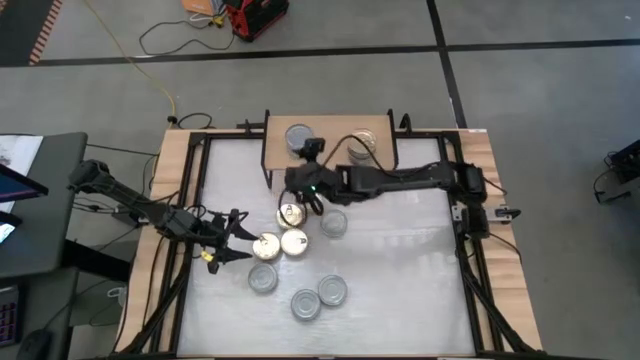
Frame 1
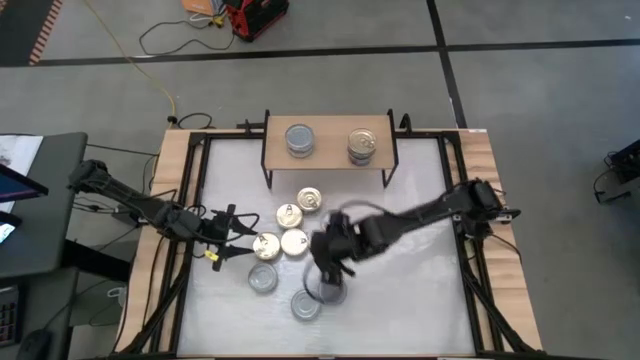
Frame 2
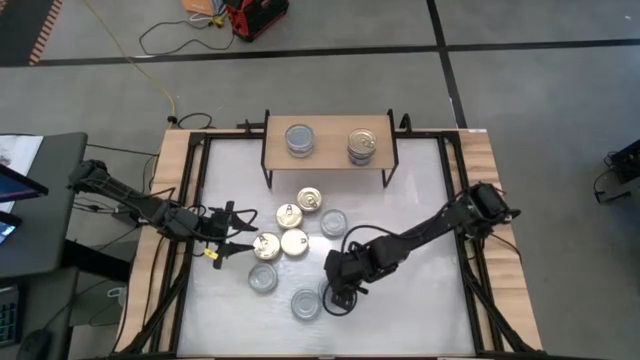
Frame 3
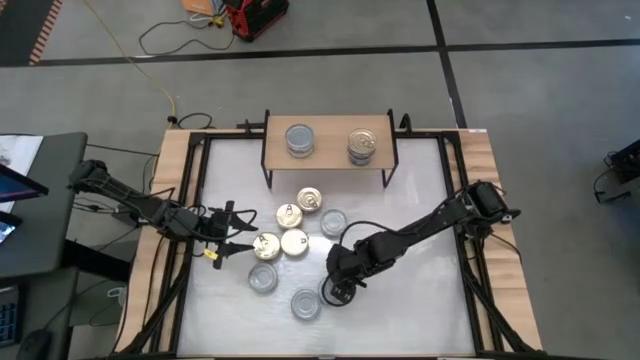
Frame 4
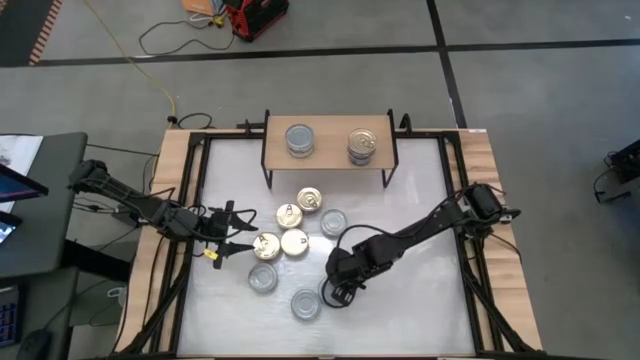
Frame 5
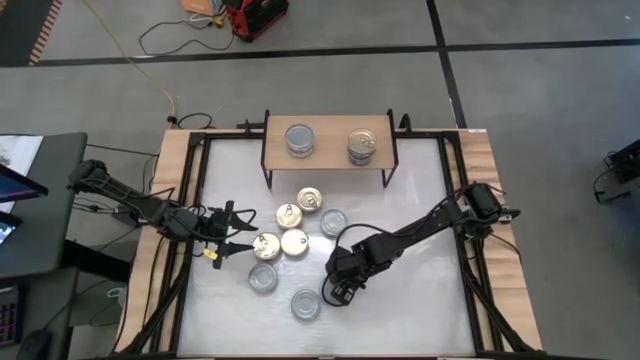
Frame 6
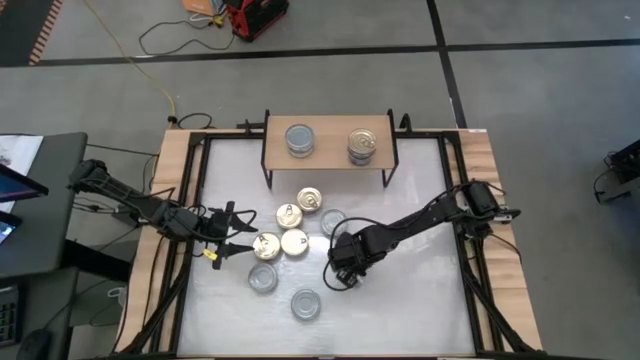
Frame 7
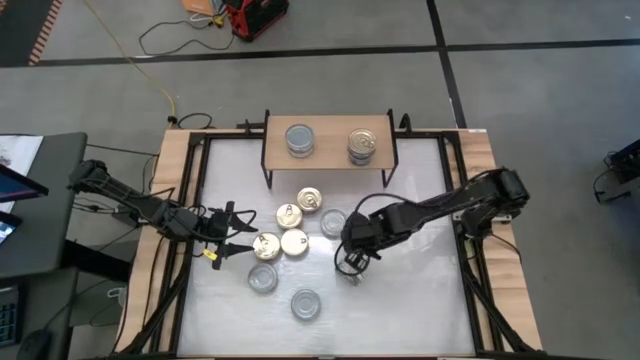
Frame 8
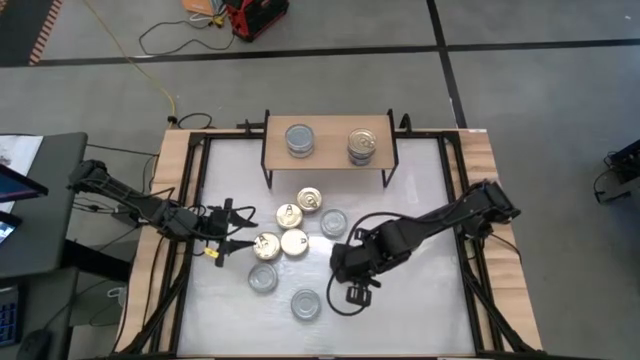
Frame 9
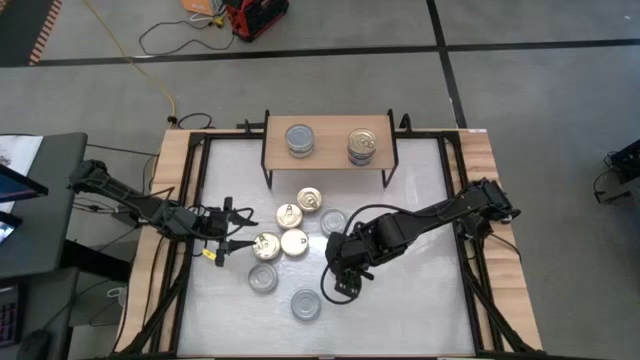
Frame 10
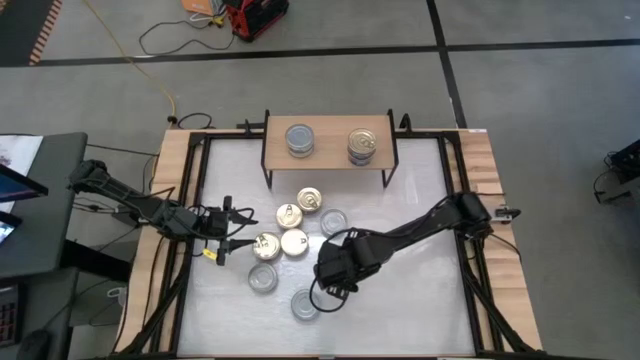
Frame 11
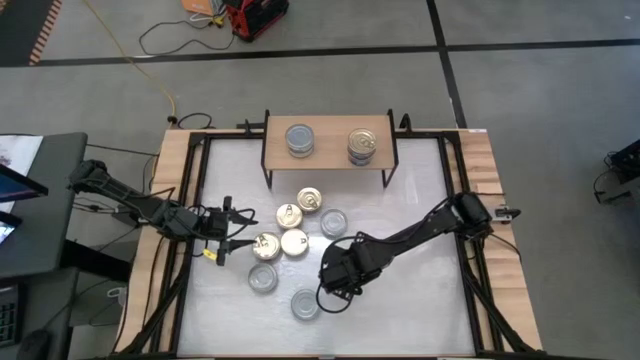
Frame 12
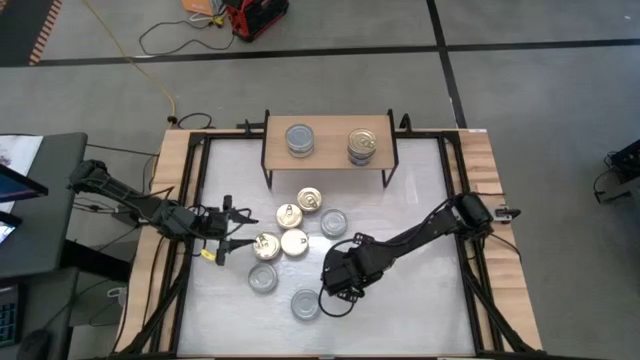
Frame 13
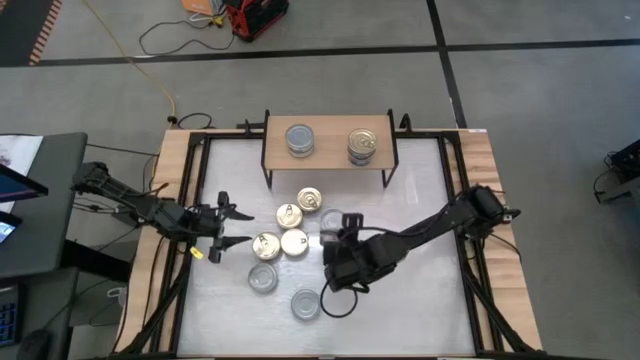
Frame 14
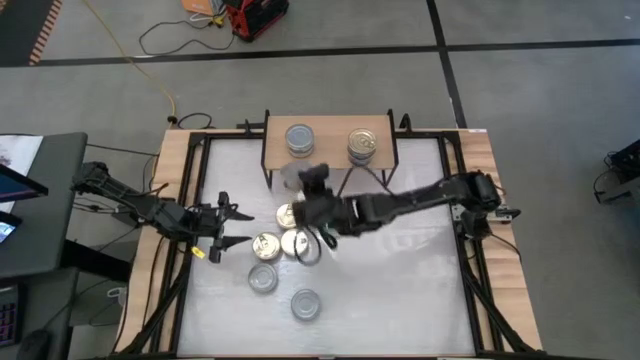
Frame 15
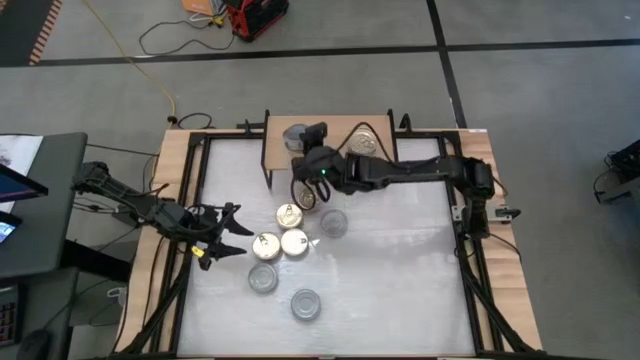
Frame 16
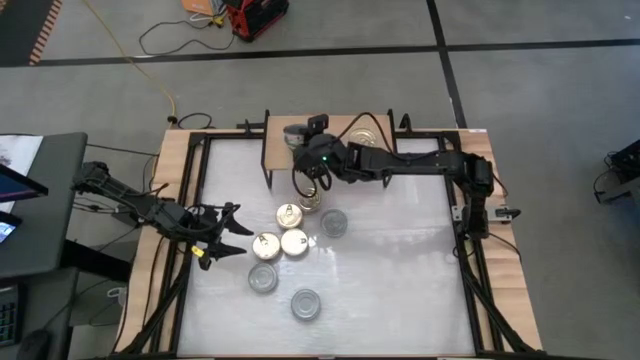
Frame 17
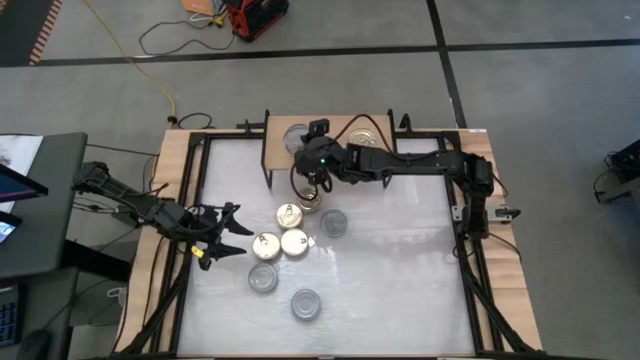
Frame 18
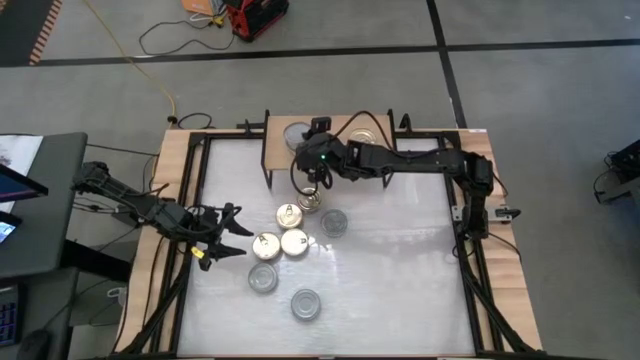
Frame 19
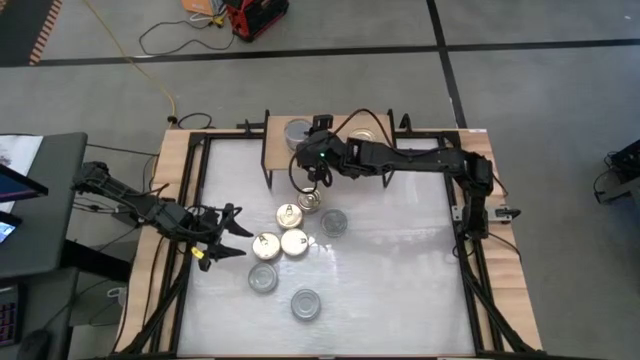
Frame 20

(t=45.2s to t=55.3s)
Task: Stack canned seafood by type on shelf
Stack the green white tuna can on top of the other green white tuna cans on the shelf

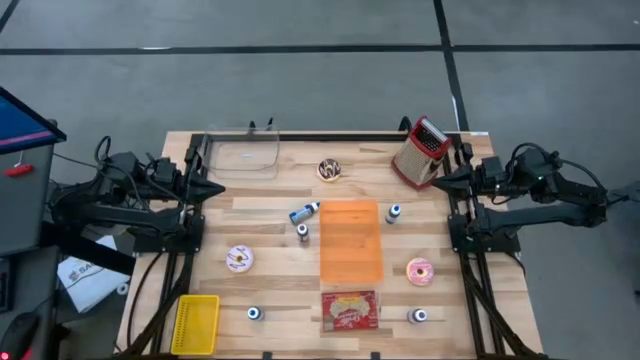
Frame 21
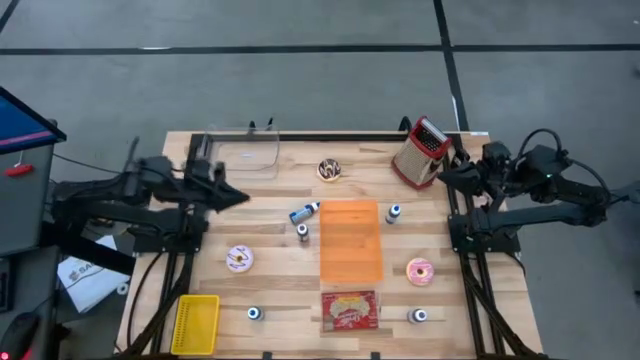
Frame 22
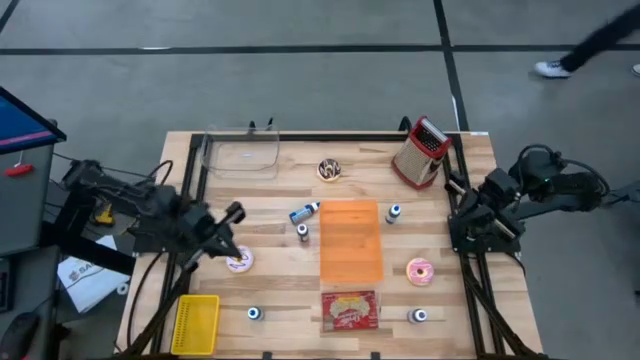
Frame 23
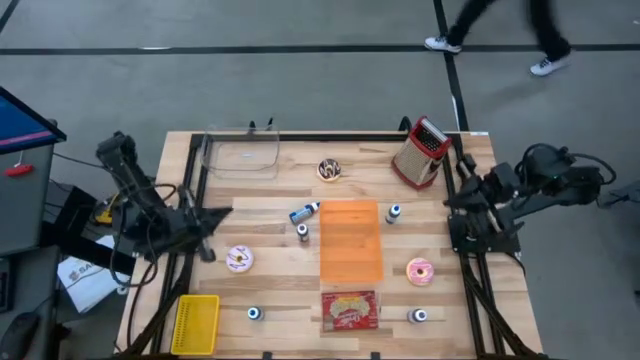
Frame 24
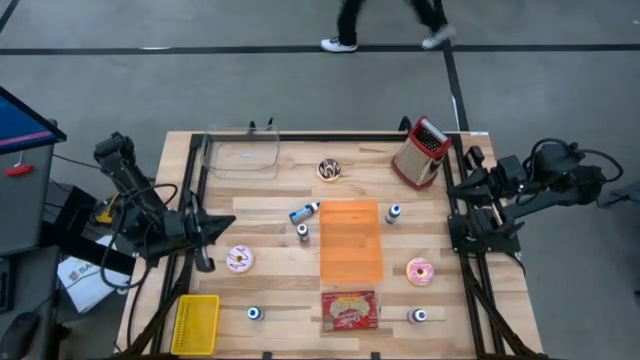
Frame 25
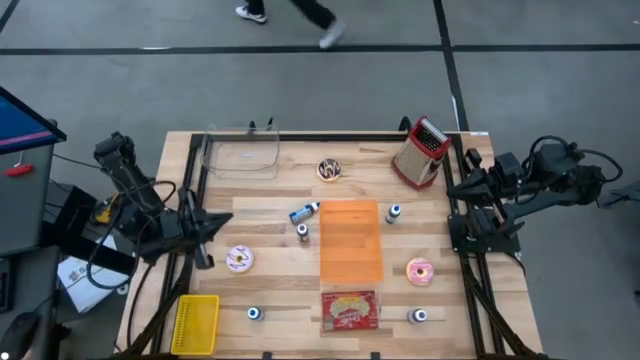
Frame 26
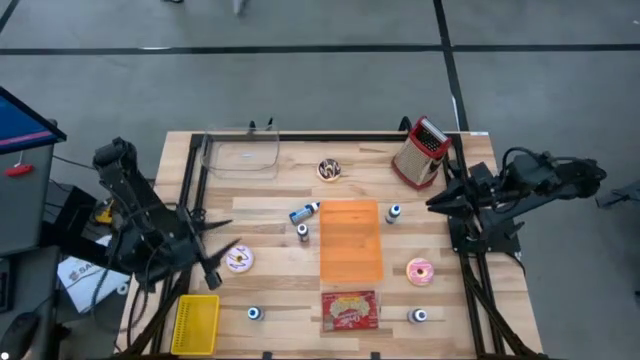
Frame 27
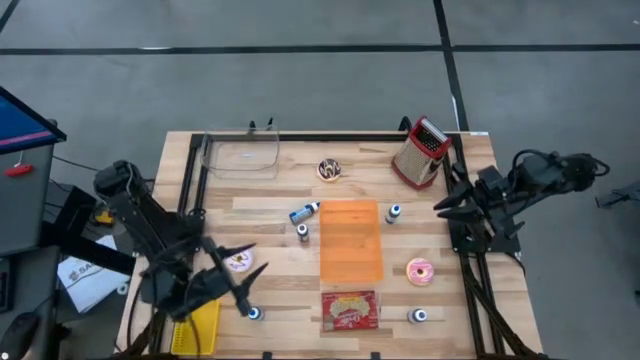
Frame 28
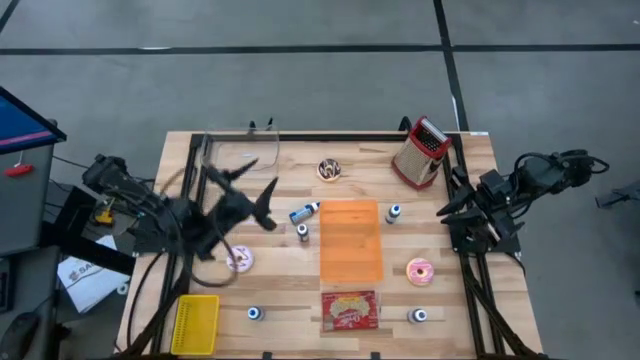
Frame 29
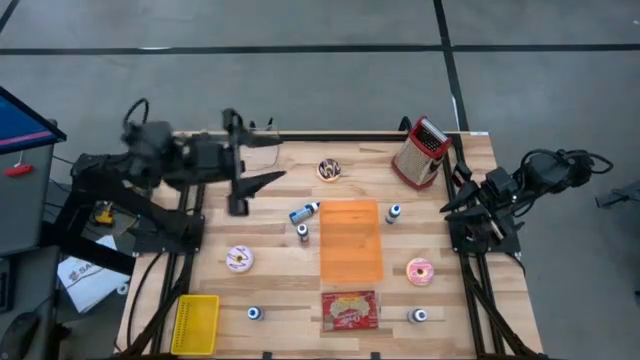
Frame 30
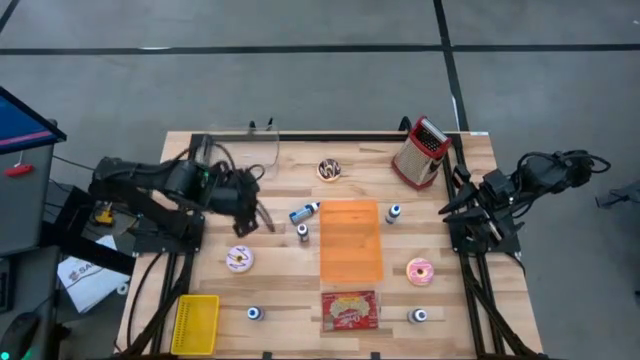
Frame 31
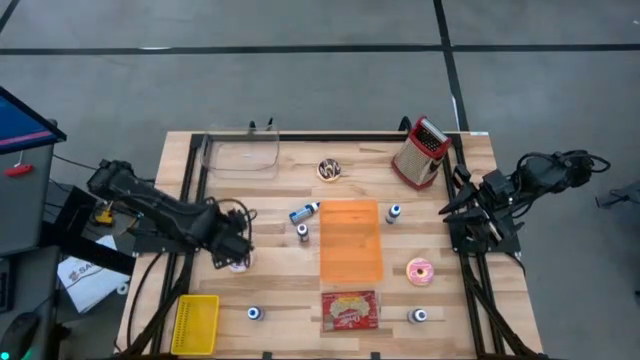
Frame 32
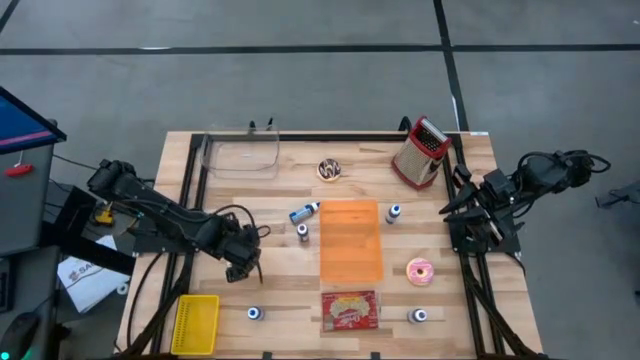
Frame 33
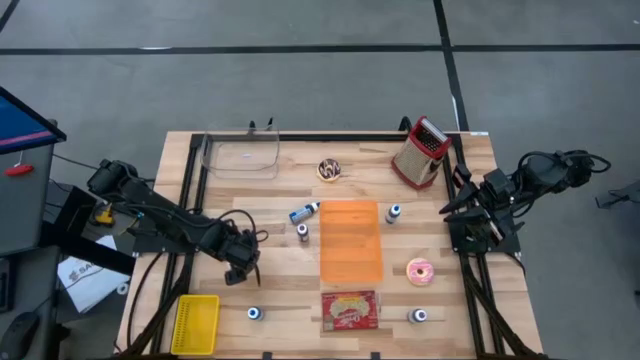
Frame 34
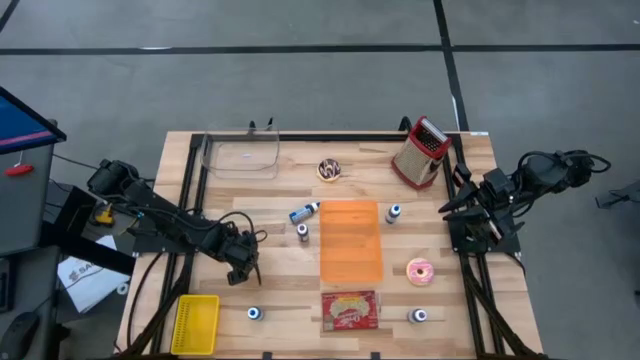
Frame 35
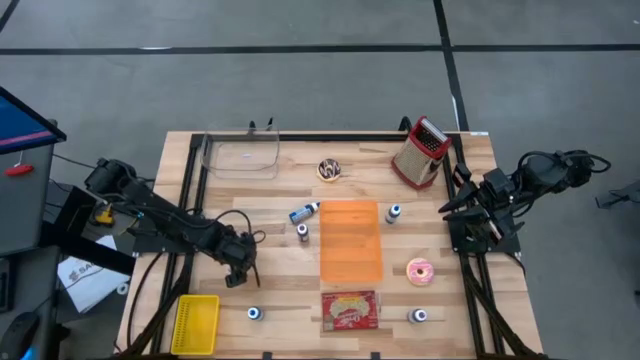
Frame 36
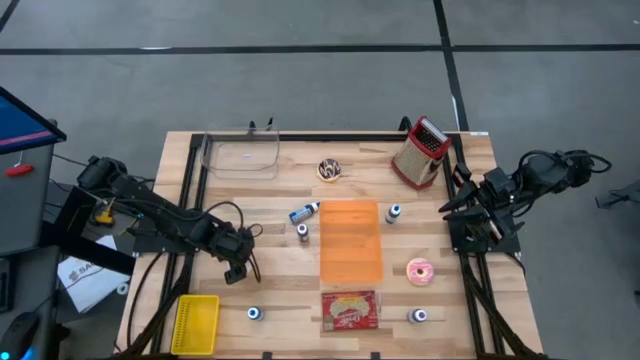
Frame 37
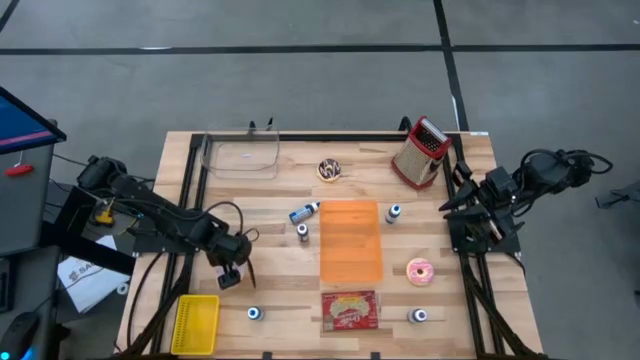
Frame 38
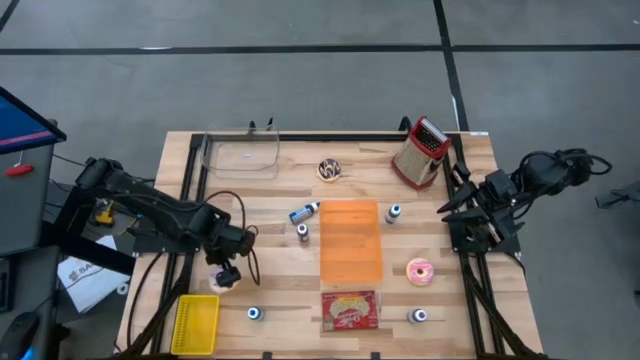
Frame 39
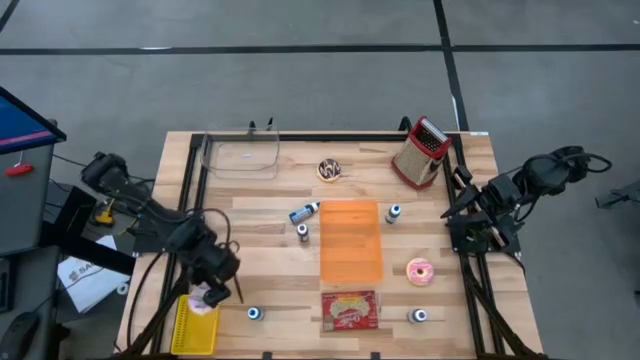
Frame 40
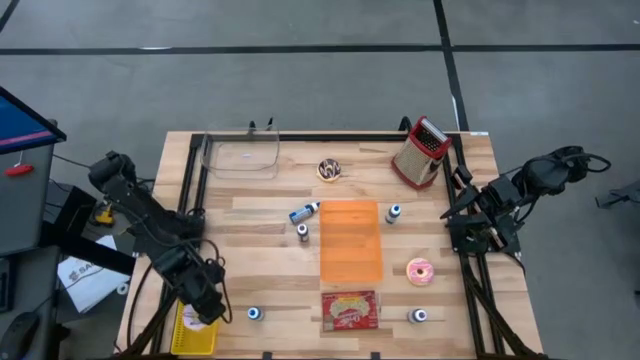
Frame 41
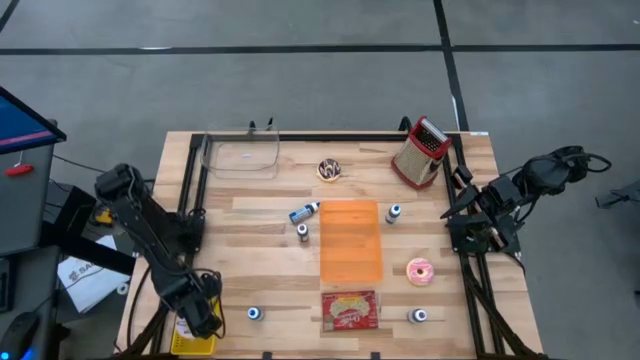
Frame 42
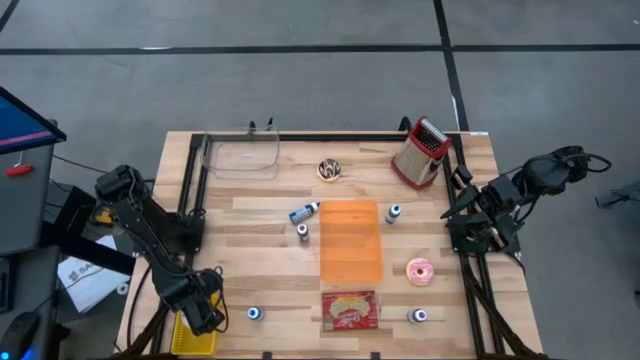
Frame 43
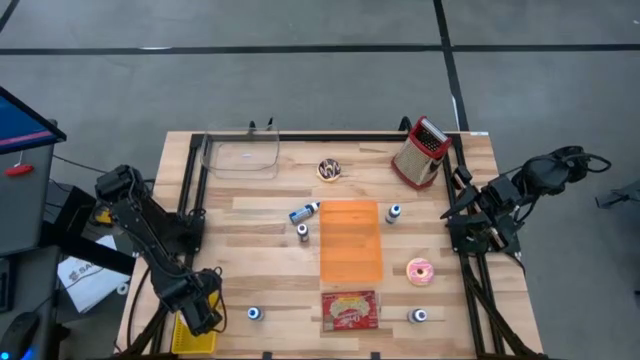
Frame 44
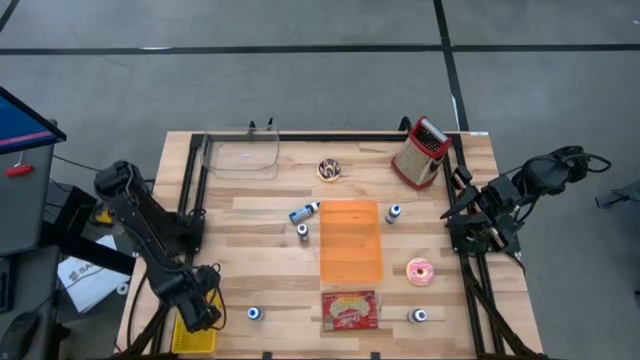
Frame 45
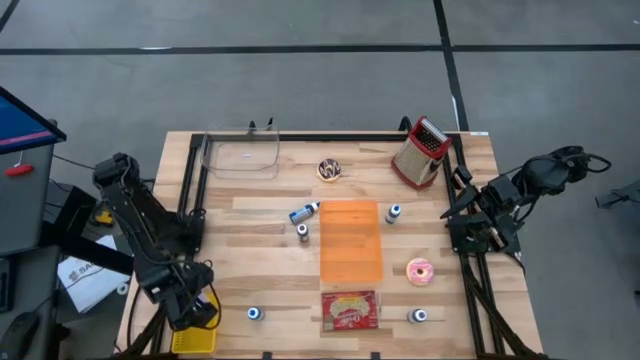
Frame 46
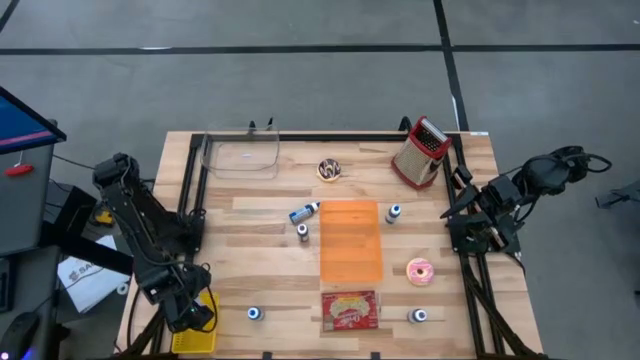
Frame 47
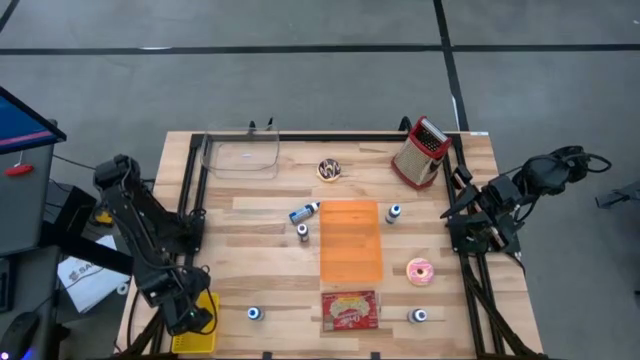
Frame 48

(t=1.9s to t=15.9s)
Task: Pick & Place Food Item
Put the light violet donut into the yellow basket
